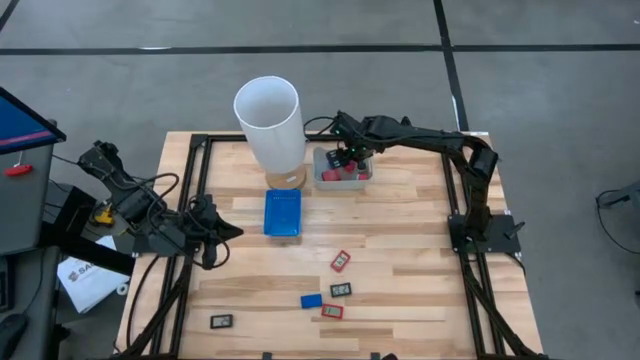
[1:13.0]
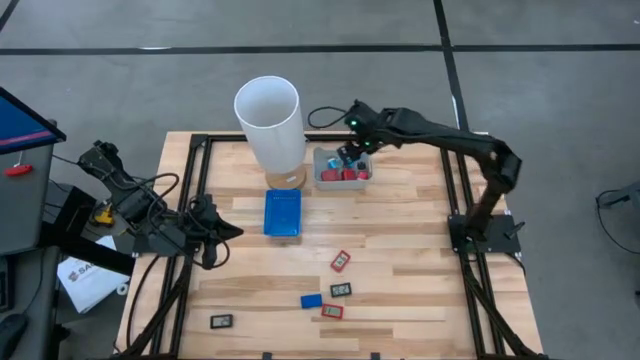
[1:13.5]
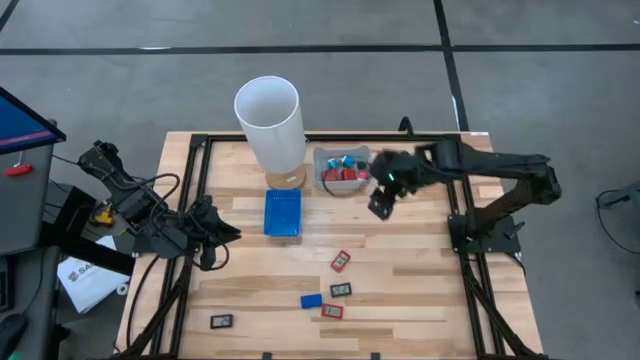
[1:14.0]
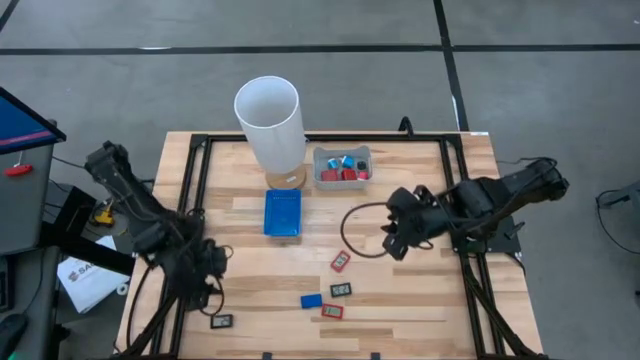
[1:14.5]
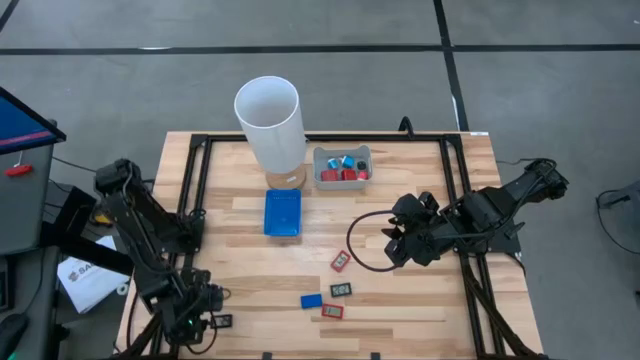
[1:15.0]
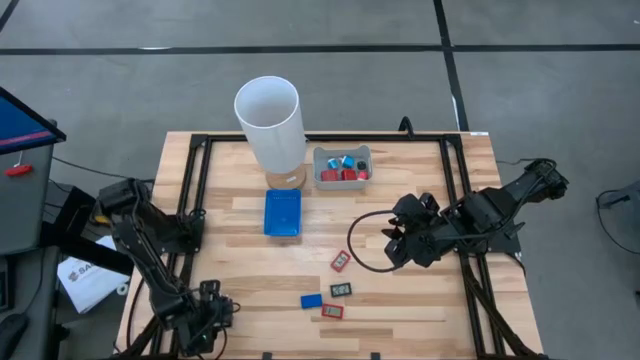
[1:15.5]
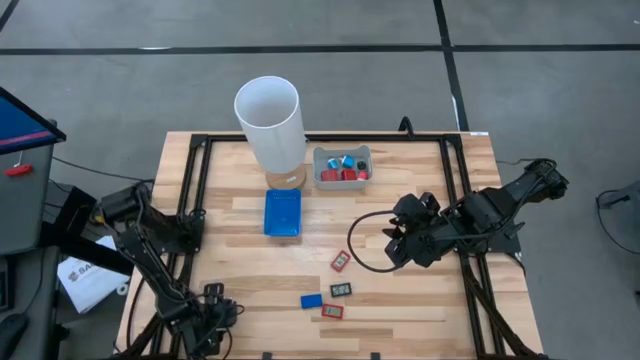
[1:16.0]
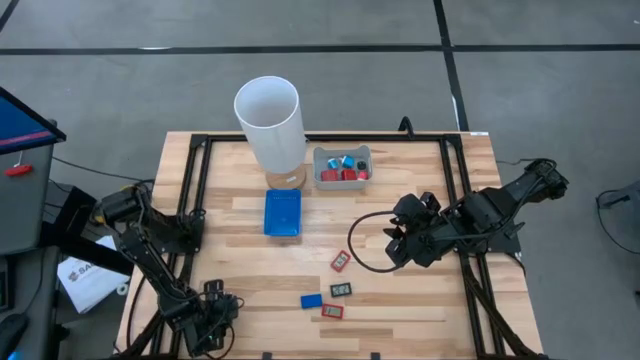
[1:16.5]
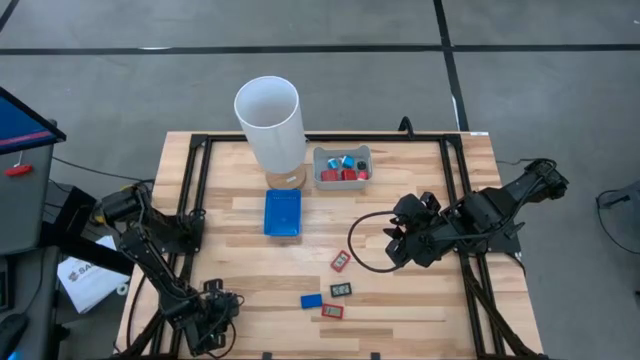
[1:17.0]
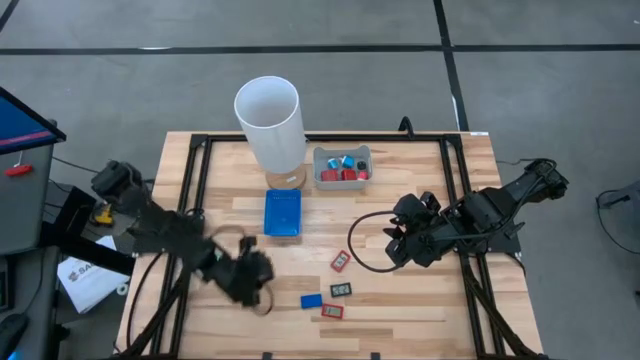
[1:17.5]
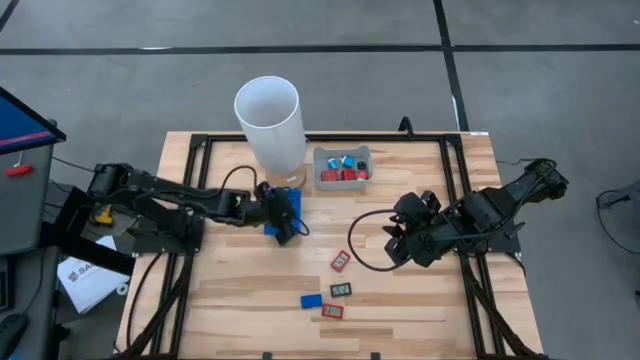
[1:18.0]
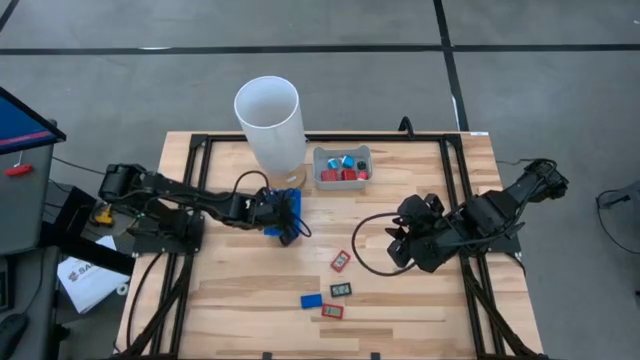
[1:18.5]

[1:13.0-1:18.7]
Task: Pick & Place Office items
Put the bottom black digital clock into the blue bin

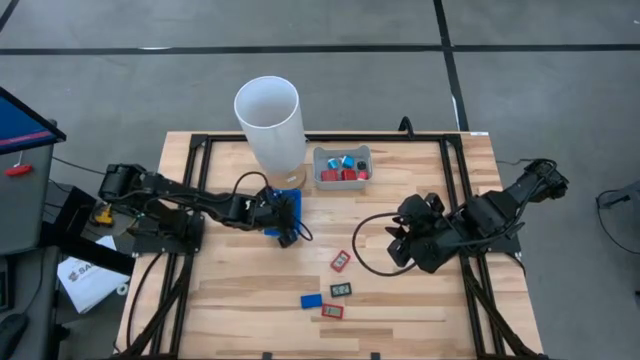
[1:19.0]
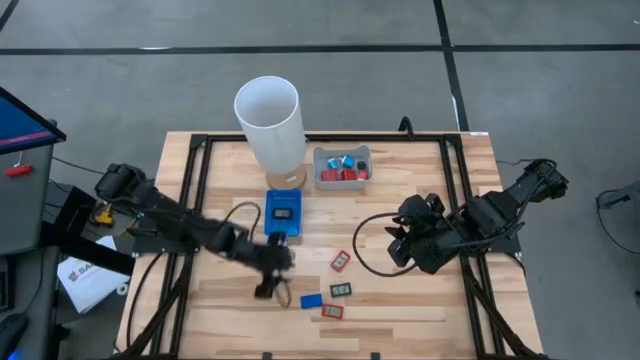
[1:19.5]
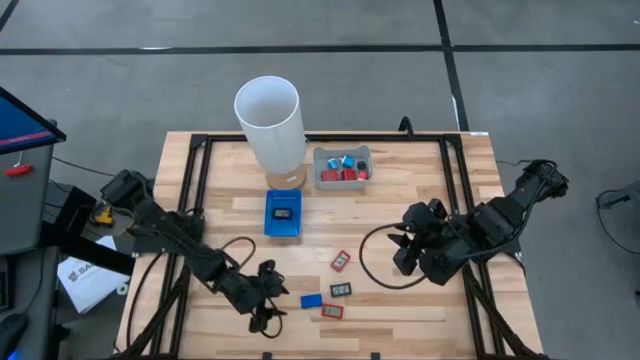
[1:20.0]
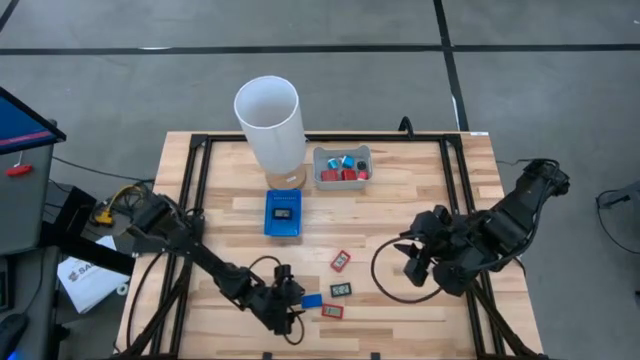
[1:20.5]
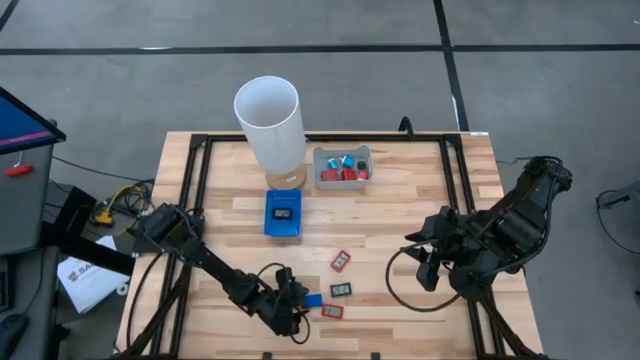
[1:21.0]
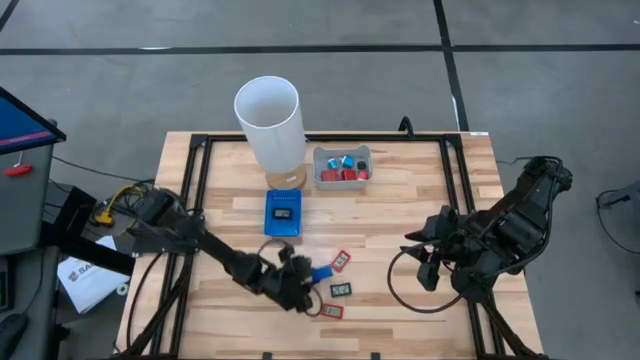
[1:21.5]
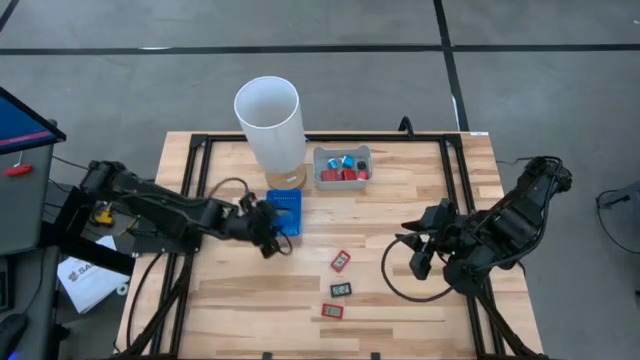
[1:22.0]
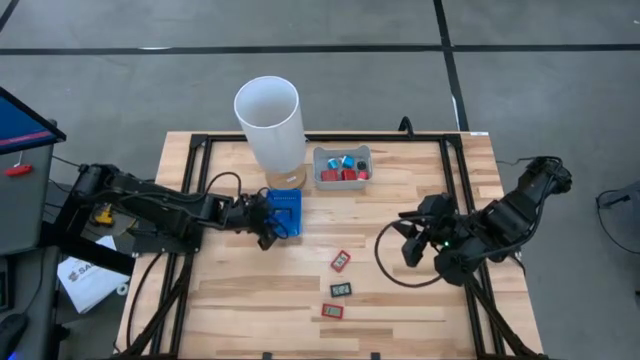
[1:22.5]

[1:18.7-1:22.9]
Put the blue digital clock into the blue bin

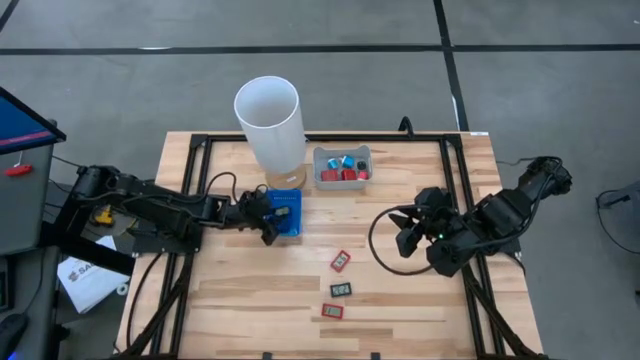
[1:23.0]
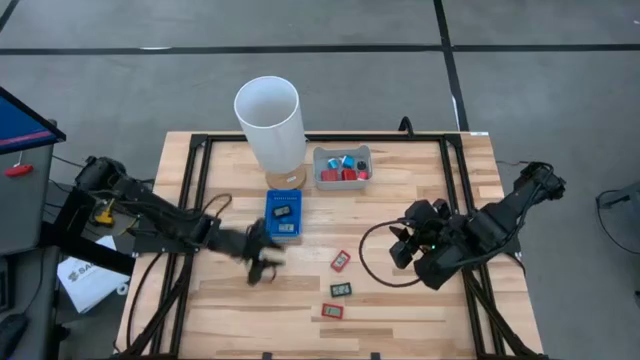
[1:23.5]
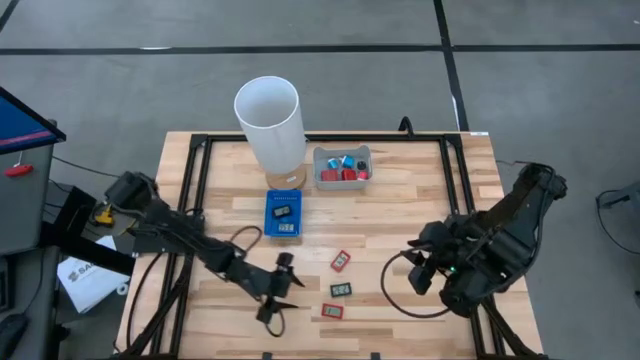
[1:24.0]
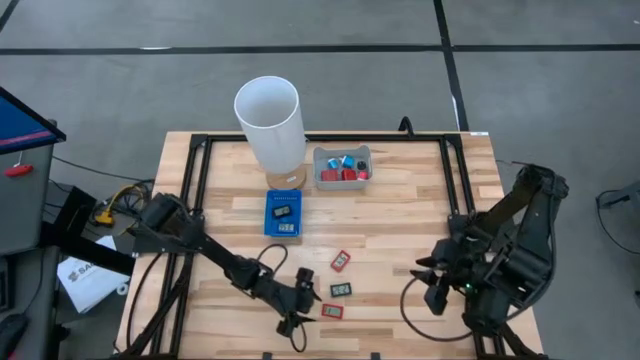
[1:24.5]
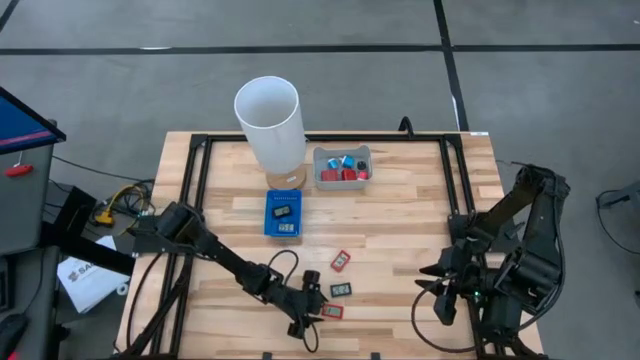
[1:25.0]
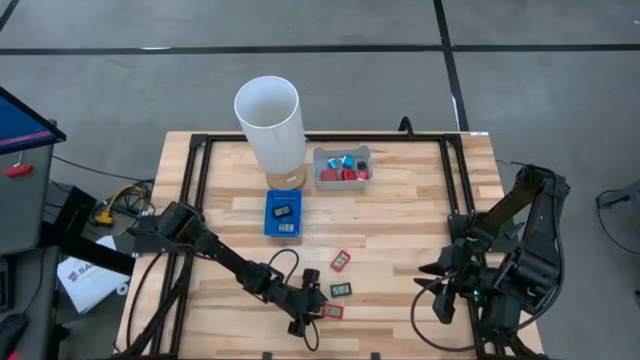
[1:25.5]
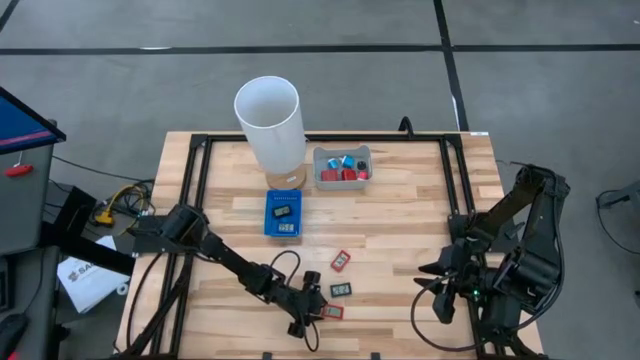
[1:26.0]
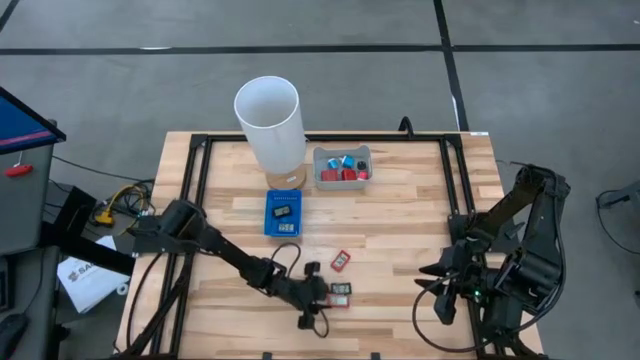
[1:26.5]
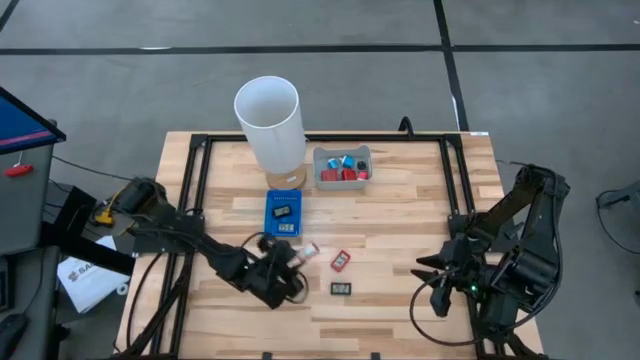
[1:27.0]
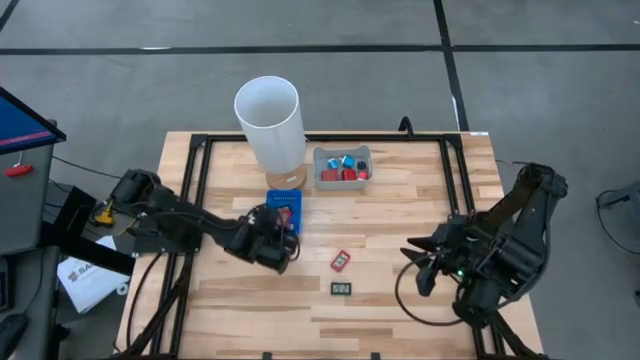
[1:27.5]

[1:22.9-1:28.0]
Put the bottom red digital clock into the blue bin

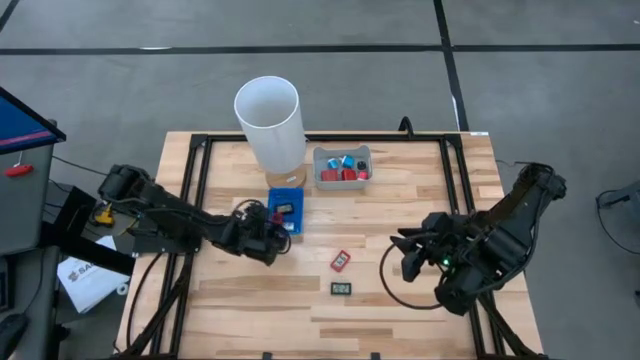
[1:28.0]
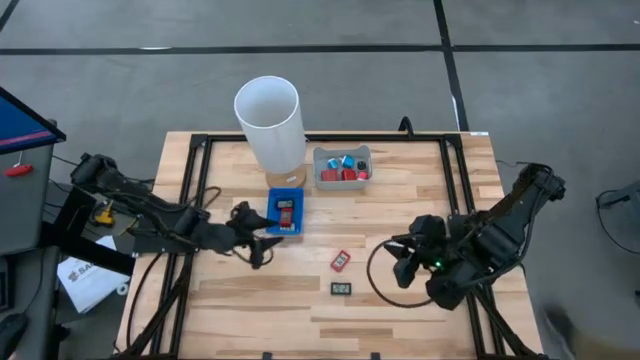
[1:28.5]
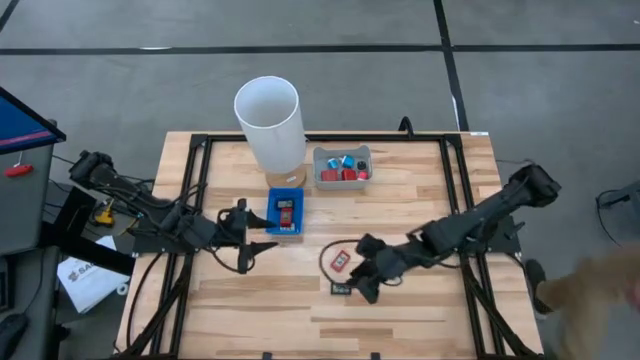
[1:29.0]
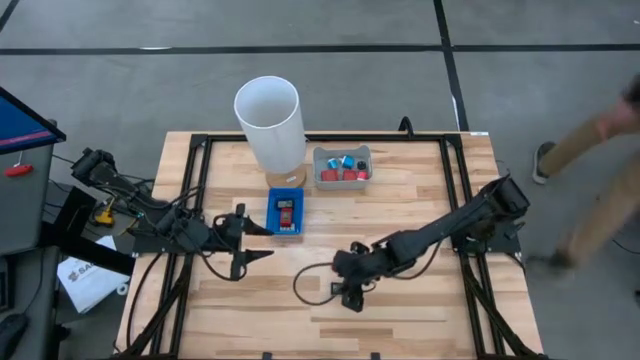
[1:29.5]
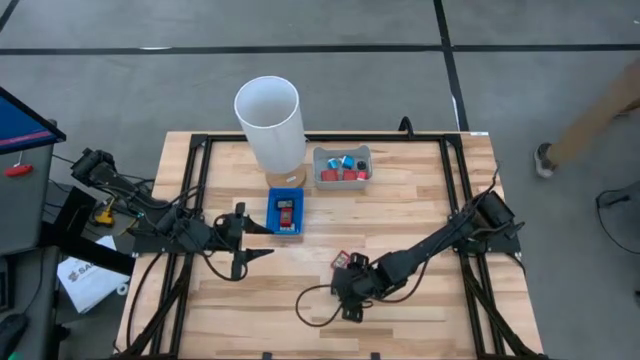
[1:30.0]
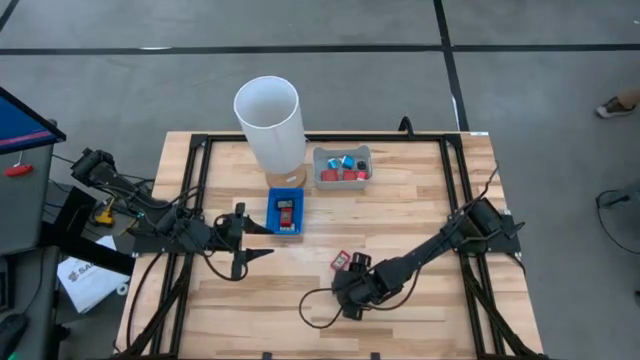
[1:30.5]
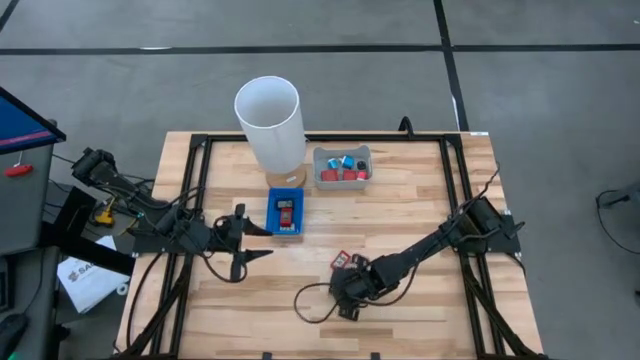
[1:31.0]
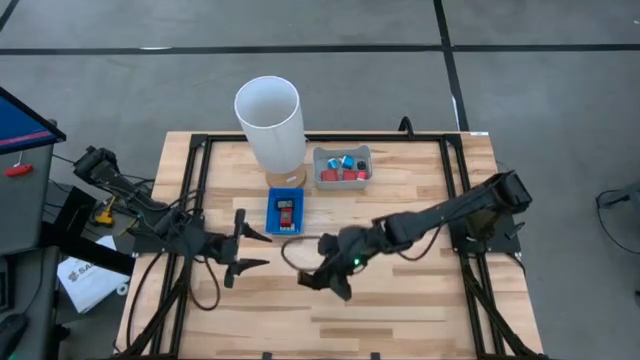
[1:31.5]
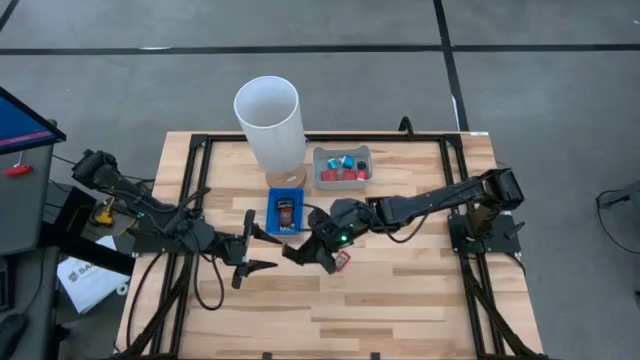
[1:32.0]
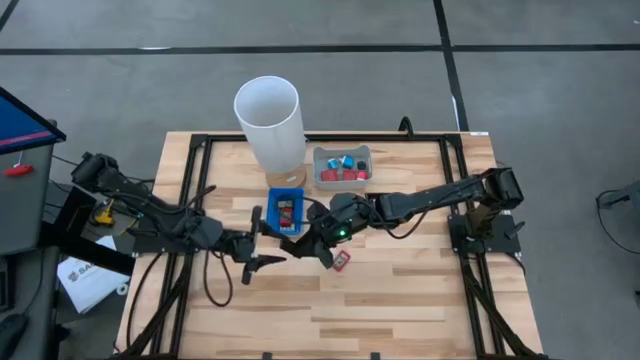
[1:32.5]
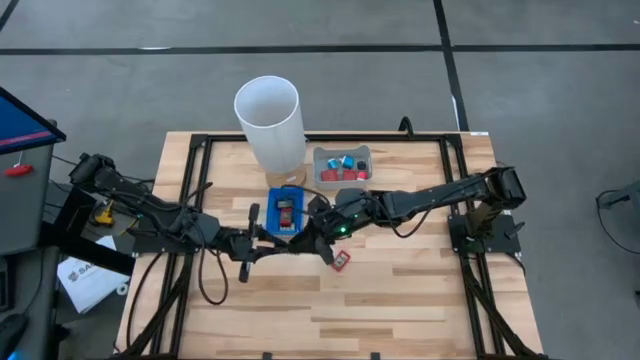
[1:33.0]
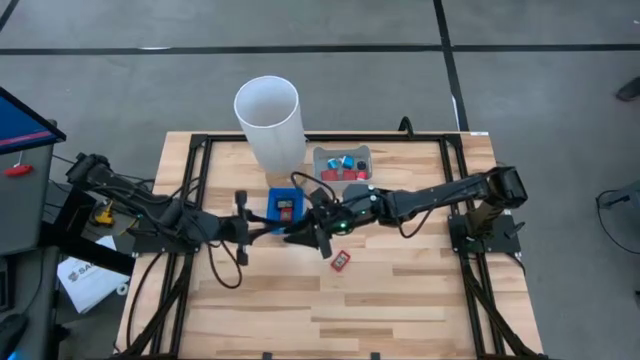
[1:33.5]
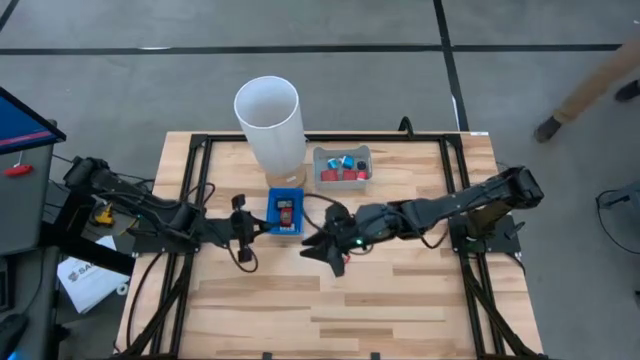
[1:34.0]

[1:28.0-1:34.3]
Put the black digital clock into the blue bin
